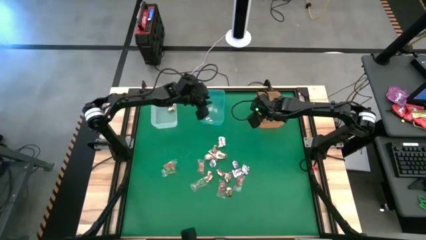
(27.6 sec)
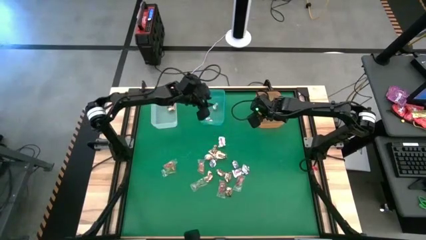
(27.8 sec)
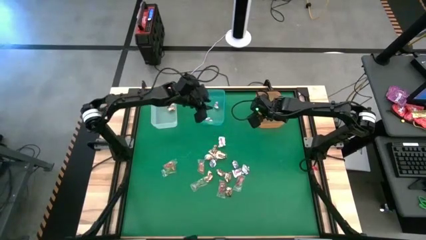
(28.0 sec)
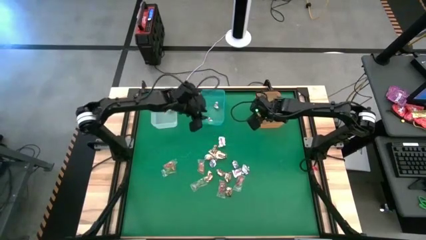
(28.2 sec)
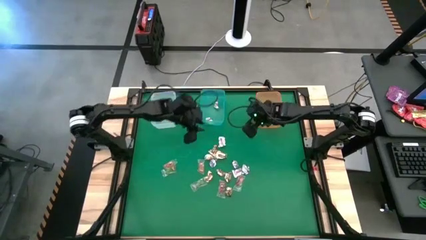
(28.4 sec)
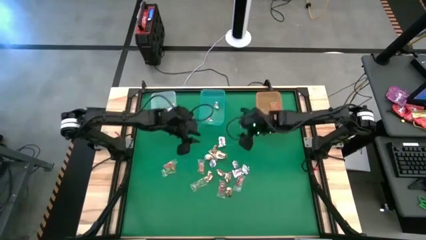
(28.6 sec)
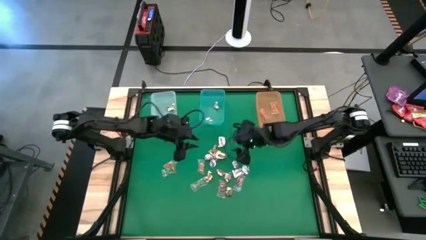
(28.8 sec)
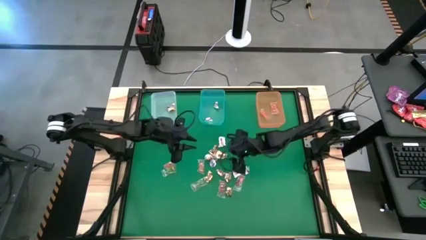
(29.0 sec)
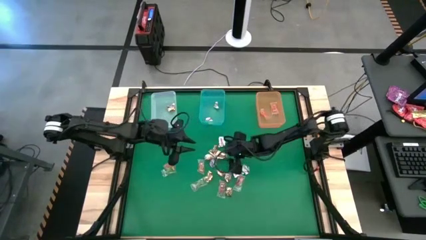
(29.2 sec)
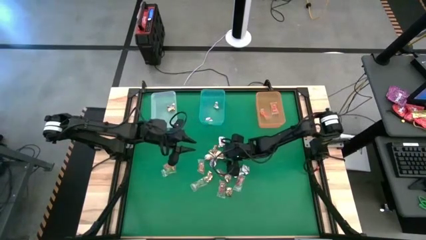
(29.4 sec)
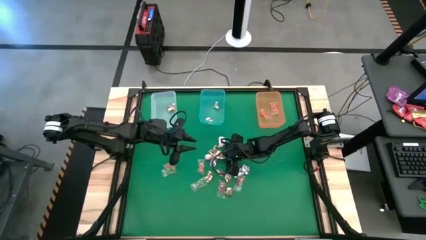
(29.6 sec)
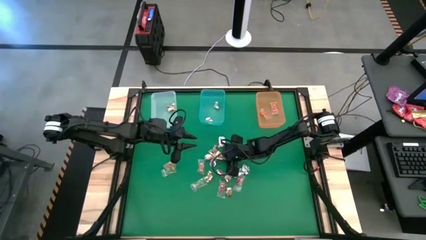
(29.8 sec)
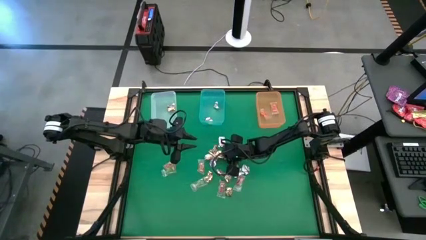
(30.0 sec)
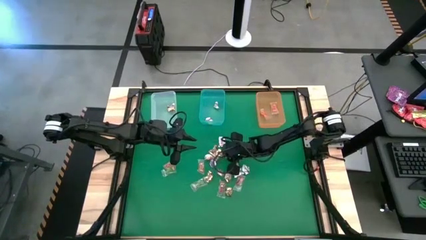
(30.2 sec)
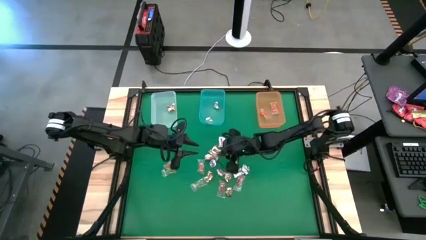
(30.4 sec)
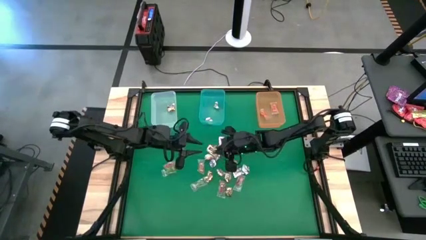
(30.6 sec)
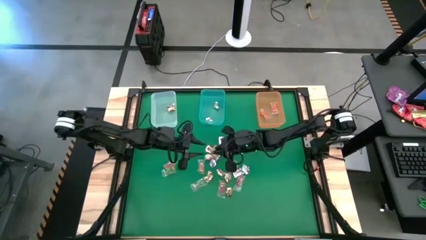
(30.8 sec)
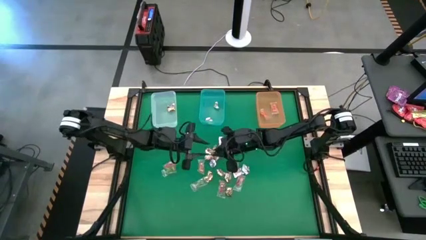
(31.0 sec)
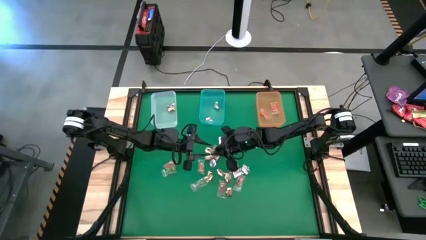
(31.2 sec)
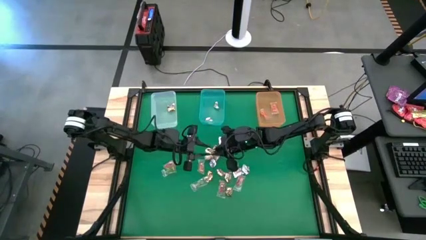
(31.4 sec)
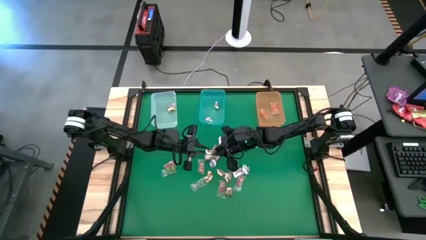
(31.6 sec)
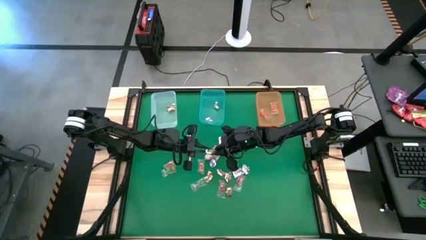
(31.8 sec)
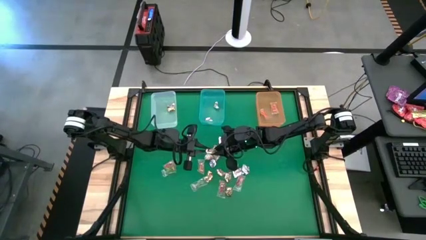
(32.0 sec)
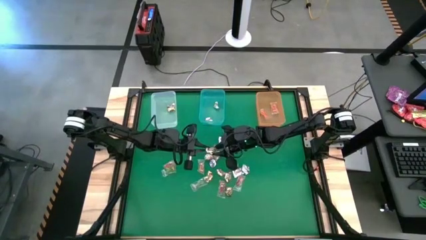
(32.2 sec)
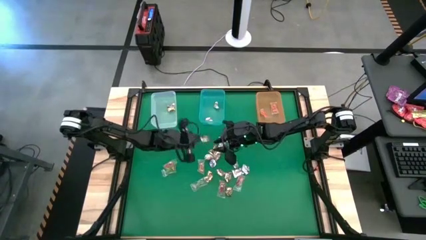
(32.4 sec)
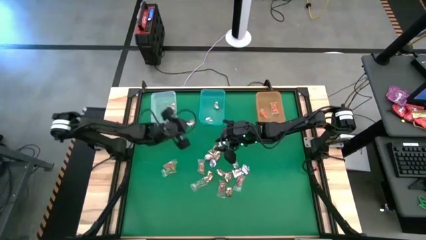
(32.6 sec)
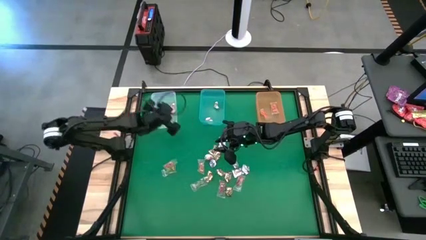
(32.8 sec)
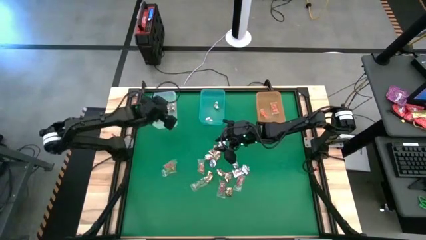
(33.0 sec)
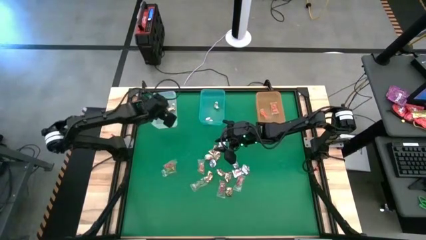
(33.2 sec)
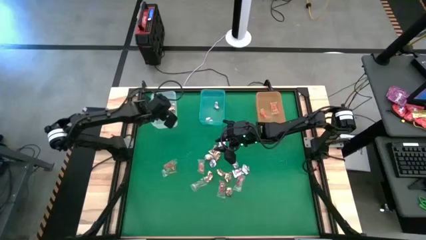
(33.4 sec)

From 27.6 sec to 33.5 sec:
Task: Sort candy by brand, put in halloween buckets
Put the gold wrap candy into the white bin

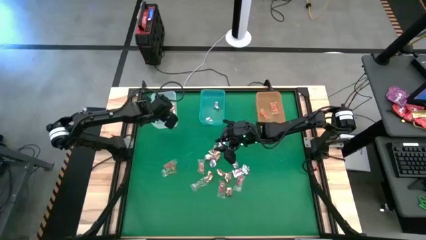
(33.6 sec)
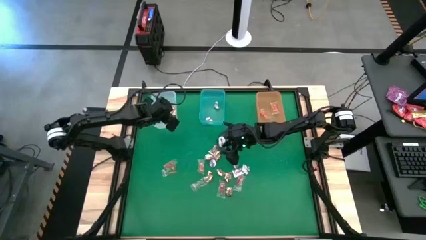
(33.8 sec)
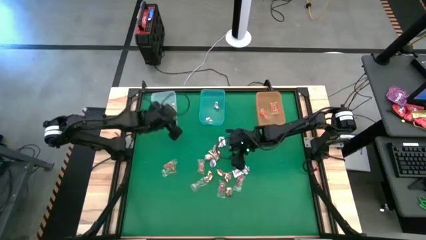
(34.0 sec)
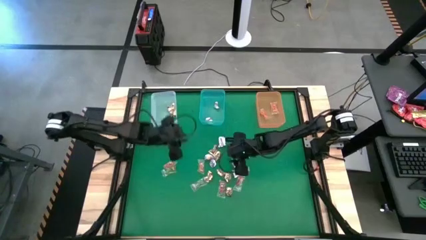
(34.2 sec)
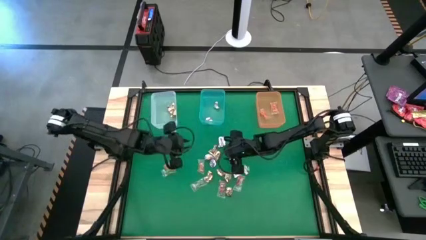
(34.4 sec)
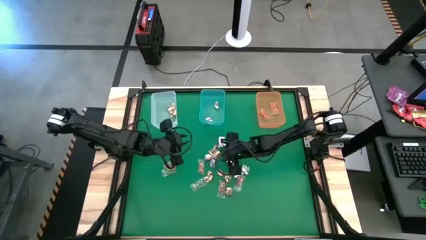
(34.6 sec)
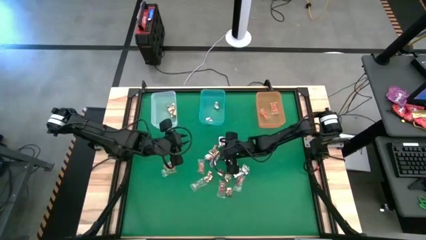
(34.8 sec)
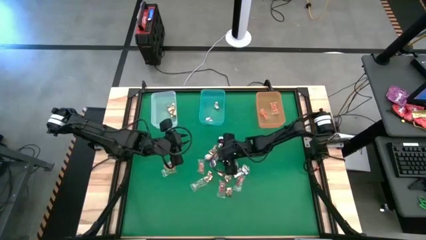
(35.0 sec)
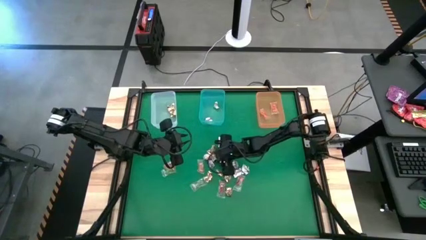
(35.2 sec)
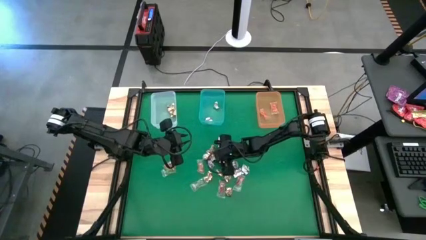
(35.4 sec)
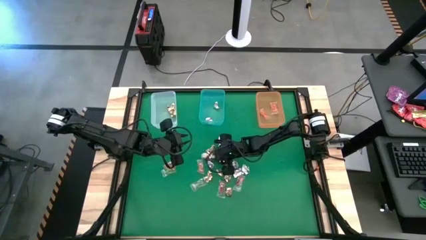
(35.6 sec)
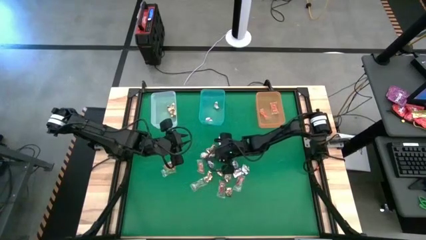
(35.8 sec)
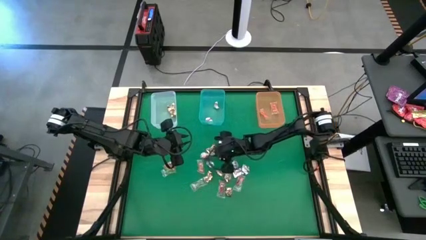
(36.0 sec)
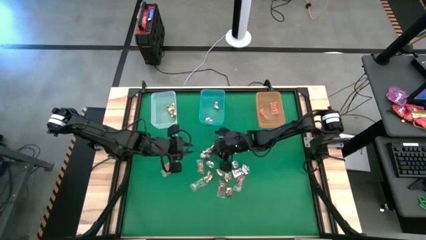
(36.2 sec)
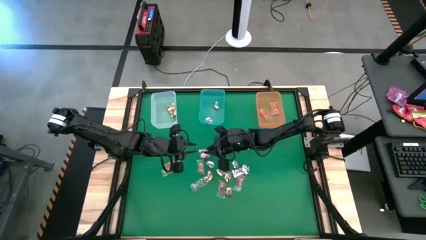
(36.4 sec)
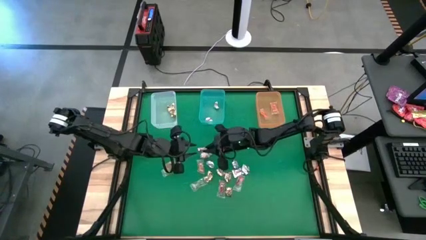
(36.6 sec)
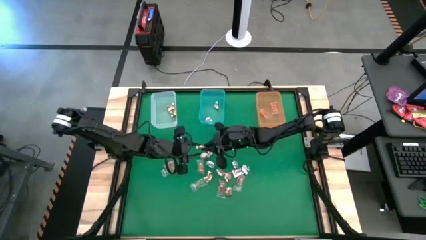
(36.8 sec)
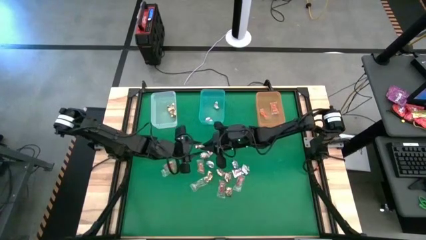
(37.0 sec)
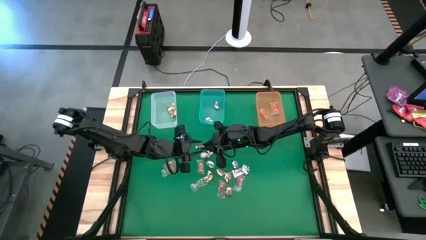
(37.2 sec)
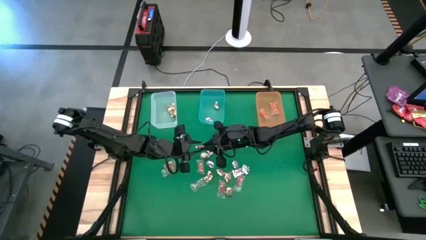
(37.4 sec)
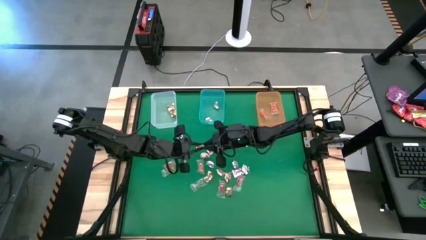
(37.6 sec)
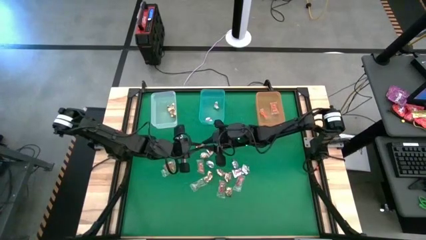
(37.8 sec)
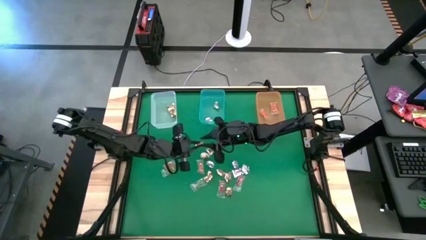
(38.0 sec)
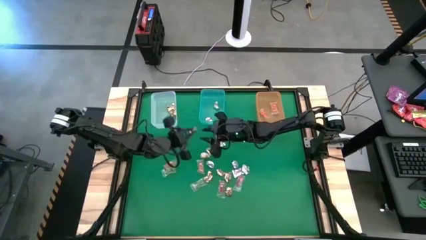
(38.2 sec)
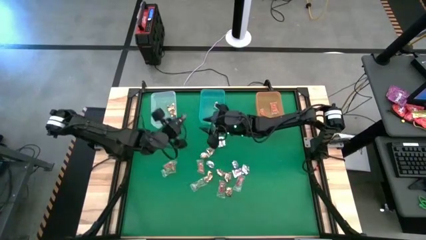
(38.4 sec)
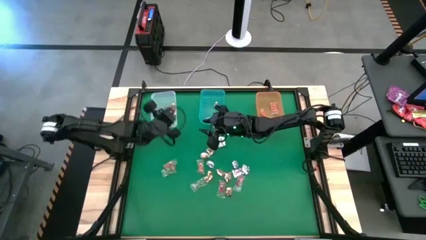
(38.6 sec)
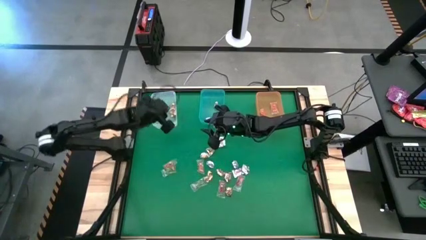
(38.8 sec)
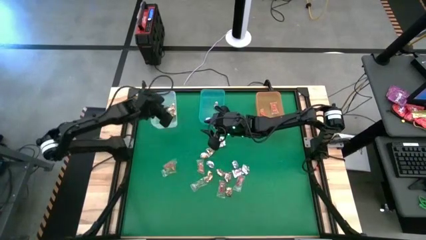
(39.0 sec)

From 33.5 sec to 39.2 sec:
Put the gold wrap candy into the white bin

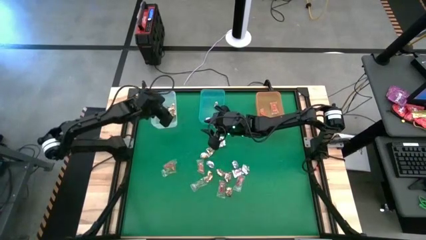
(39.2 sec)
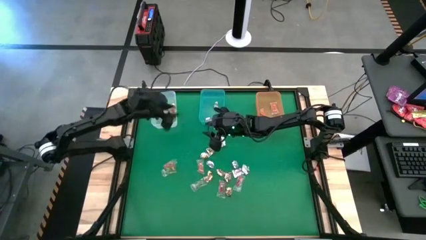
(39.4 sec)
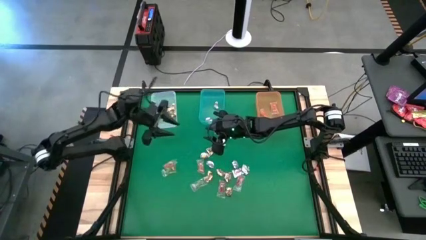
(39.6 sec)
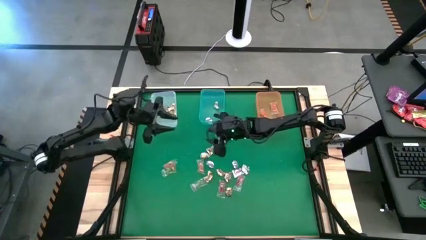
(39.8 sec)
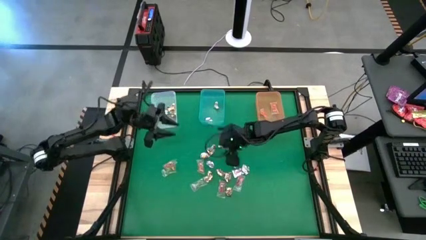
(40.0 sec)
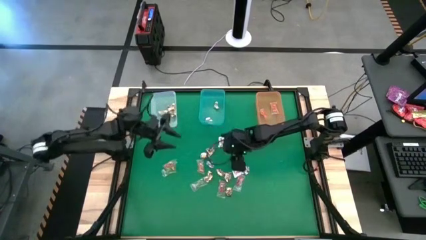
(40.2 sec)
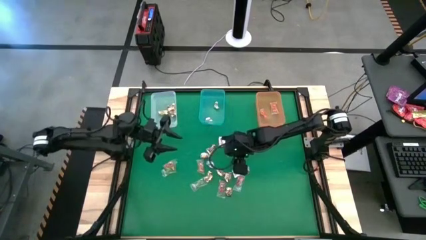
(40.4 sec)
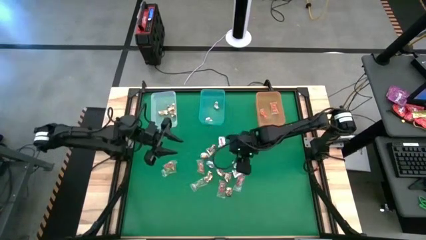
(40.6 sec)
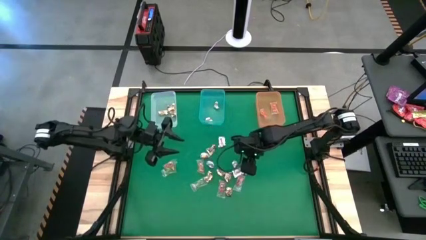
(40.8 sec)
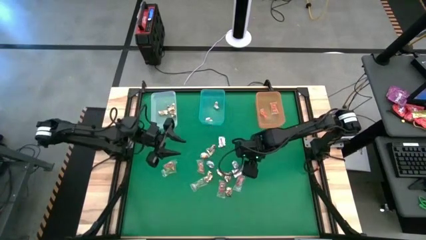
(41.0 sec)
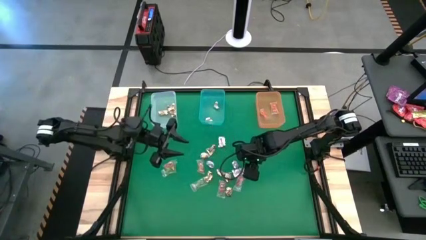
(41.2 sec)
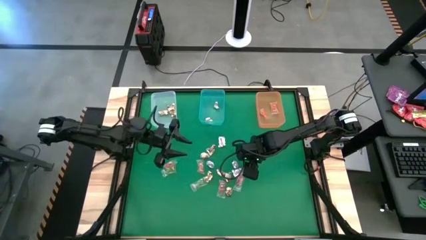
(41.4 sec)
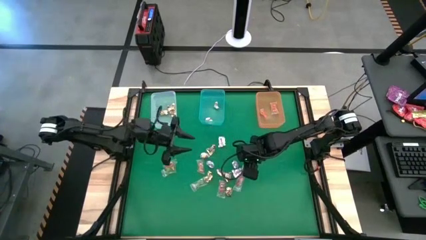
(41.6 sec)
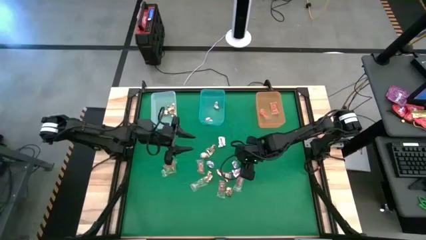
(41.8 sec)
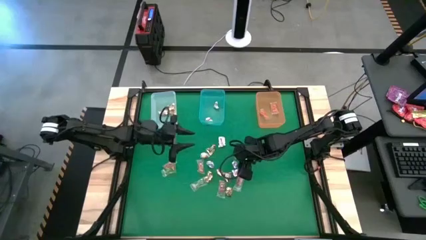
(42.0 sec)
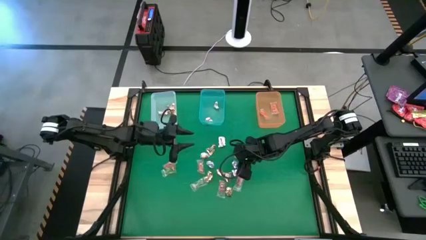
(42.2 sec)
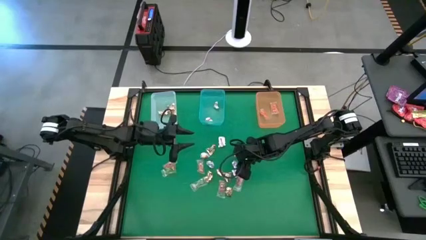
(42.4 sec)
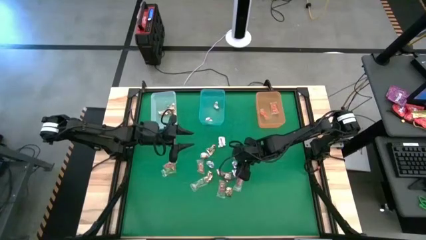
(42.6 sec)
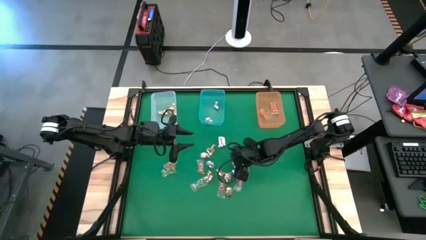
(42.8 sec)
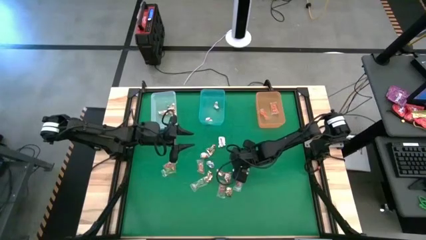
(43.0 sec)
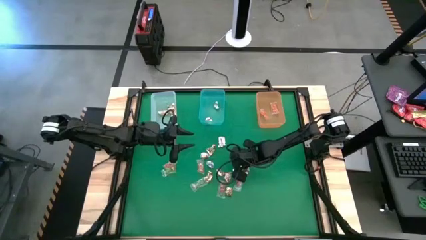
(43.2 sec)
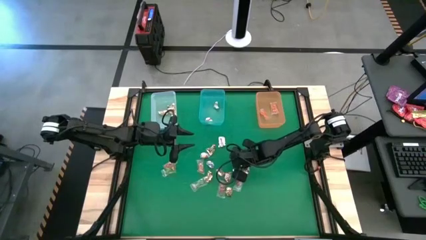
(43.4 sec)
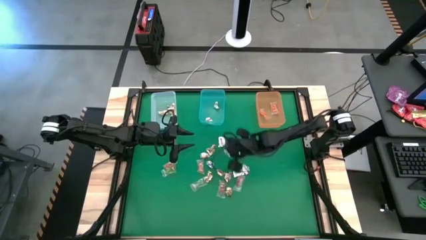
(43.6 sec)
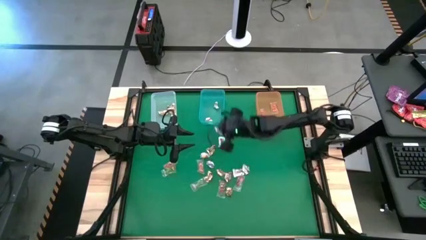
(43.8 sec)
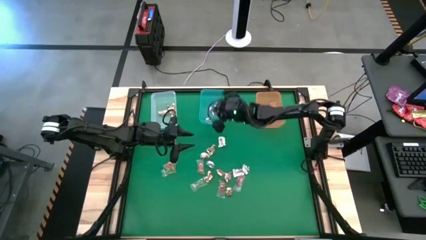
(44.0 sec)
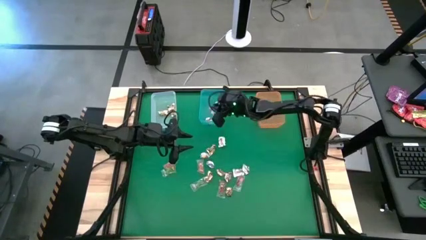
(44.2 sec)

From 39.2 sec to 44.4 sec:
Put the silver wrap candy into the blue bin
